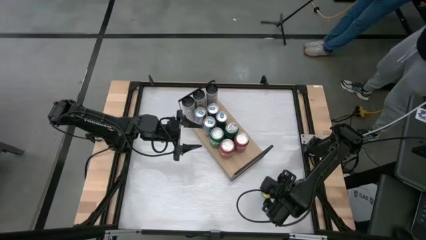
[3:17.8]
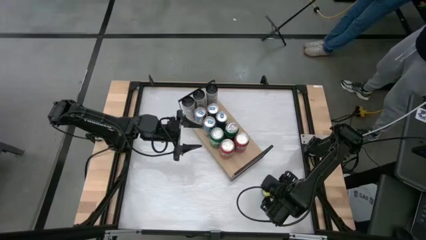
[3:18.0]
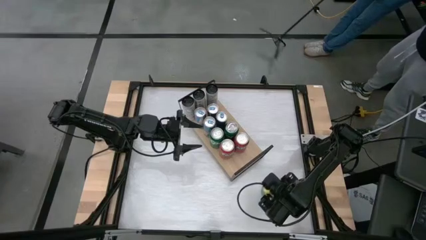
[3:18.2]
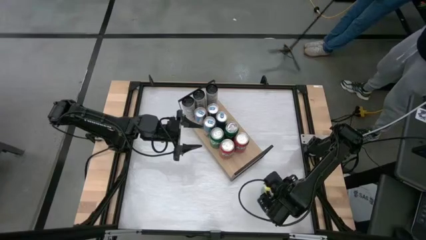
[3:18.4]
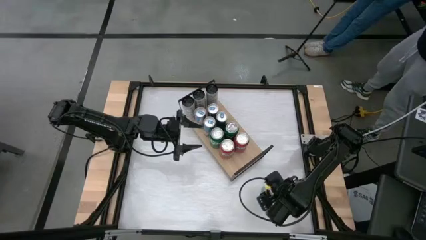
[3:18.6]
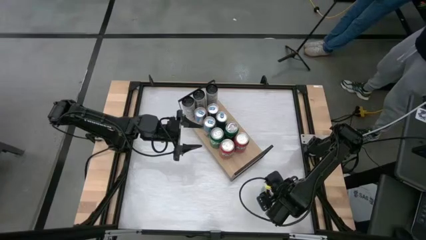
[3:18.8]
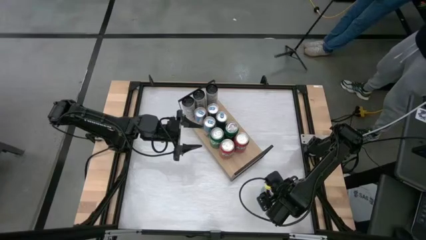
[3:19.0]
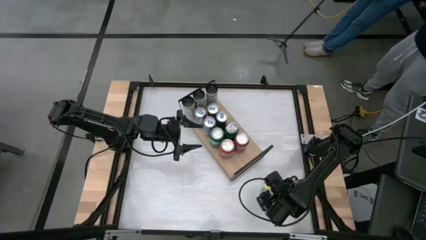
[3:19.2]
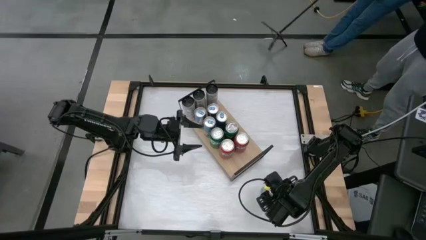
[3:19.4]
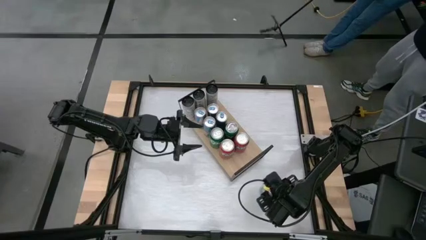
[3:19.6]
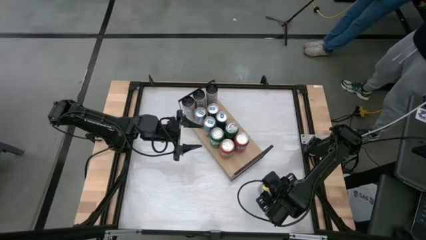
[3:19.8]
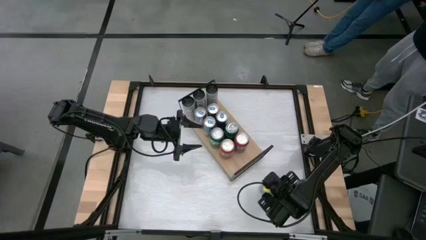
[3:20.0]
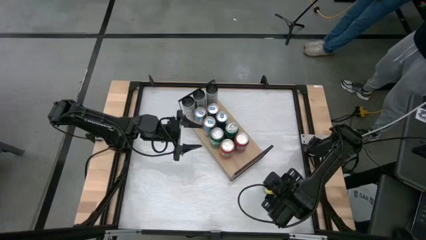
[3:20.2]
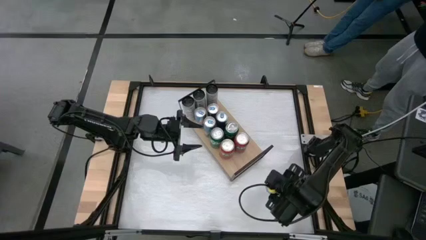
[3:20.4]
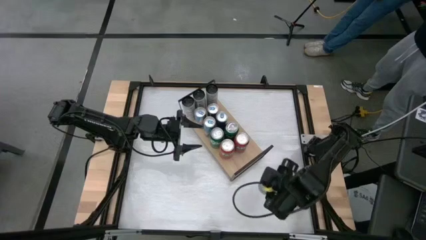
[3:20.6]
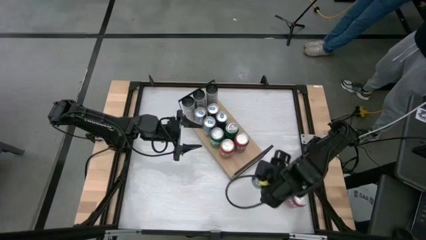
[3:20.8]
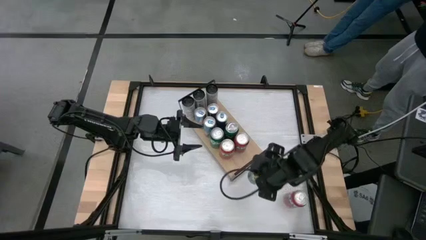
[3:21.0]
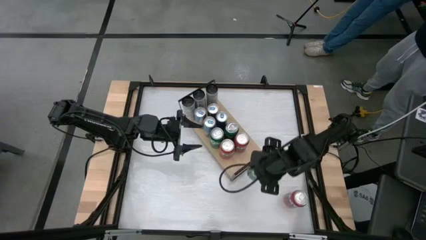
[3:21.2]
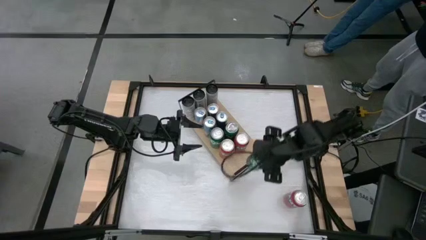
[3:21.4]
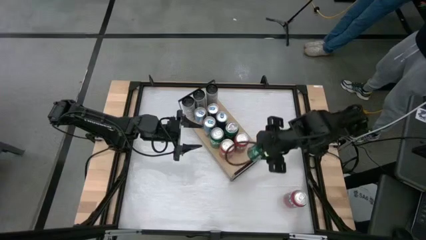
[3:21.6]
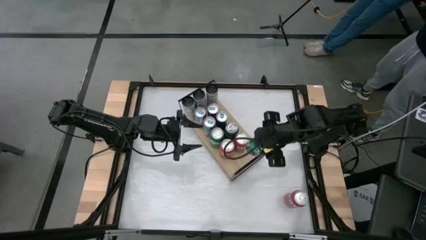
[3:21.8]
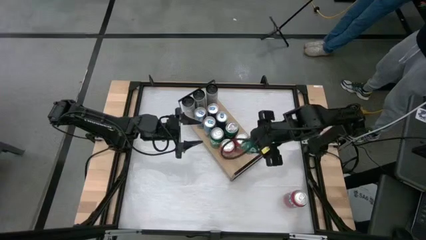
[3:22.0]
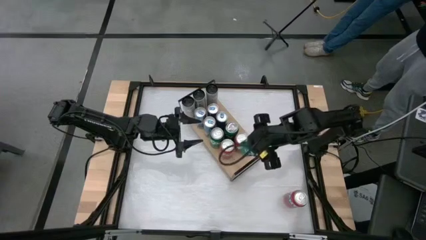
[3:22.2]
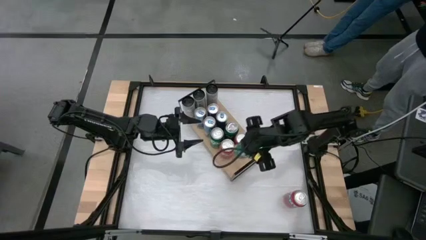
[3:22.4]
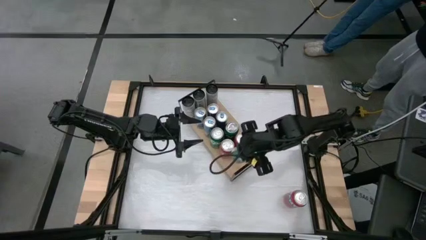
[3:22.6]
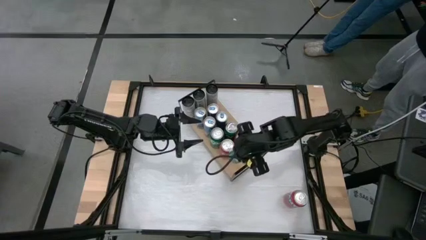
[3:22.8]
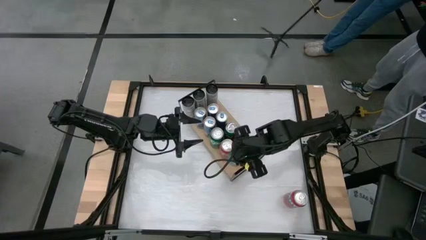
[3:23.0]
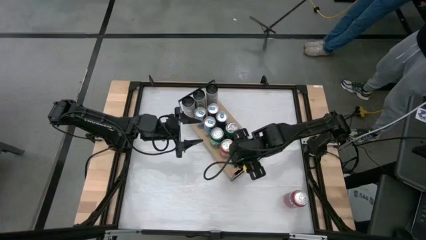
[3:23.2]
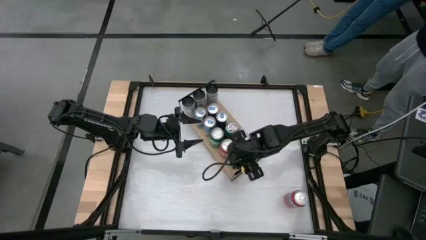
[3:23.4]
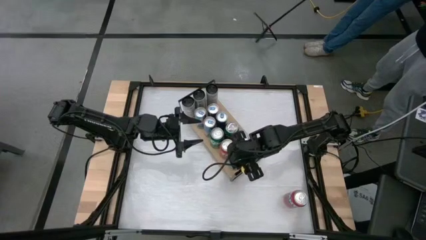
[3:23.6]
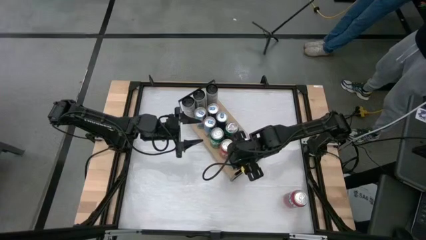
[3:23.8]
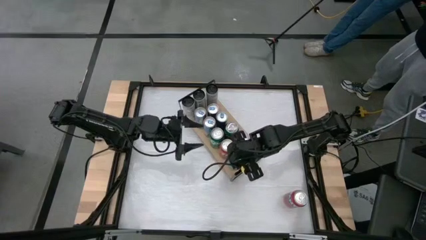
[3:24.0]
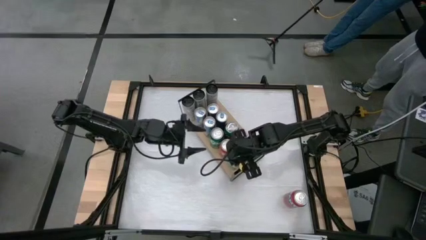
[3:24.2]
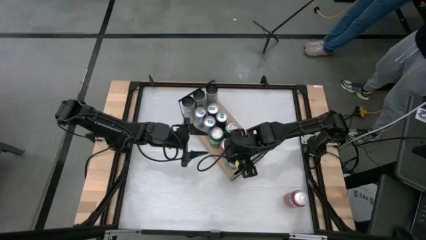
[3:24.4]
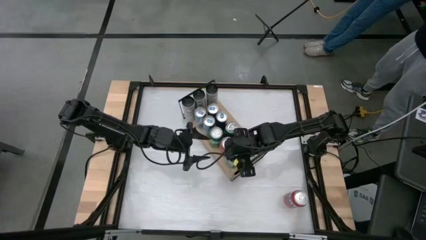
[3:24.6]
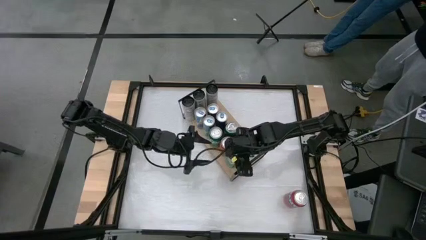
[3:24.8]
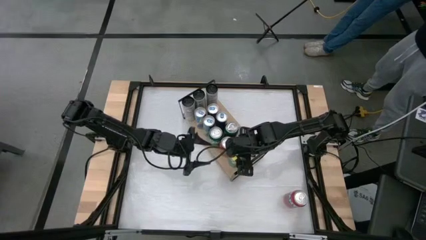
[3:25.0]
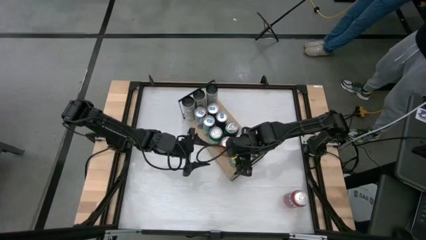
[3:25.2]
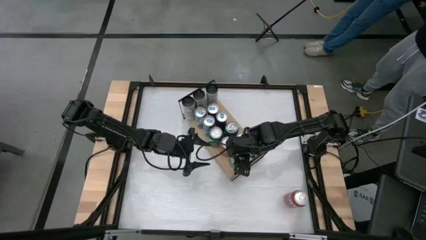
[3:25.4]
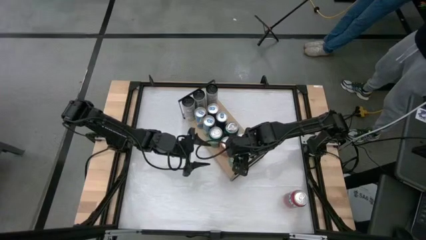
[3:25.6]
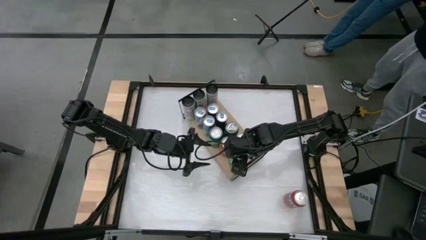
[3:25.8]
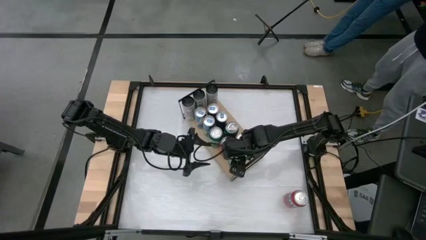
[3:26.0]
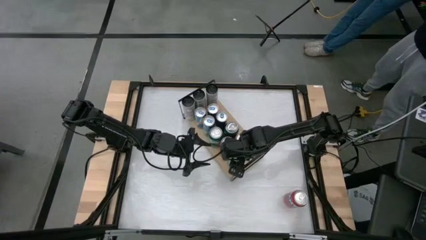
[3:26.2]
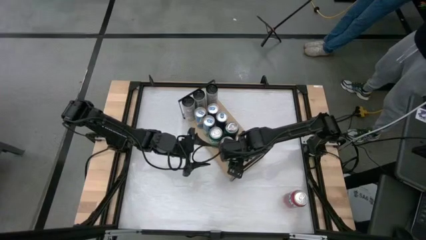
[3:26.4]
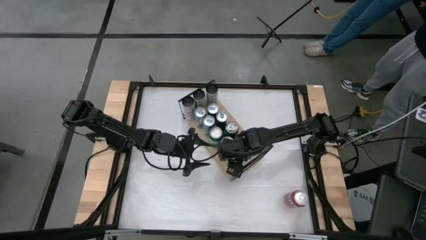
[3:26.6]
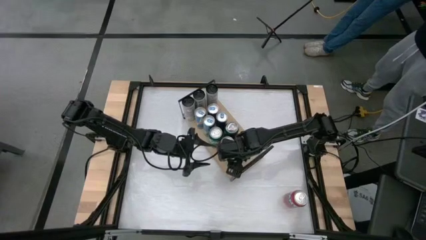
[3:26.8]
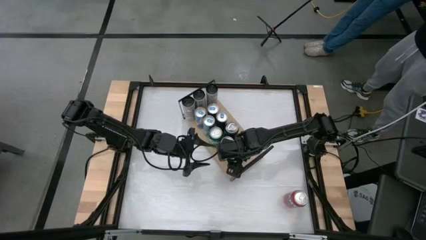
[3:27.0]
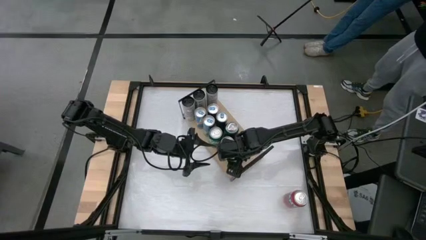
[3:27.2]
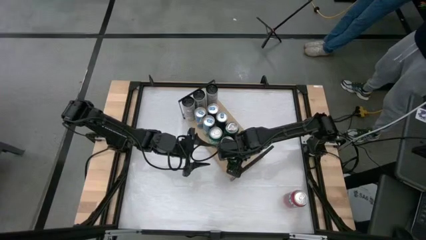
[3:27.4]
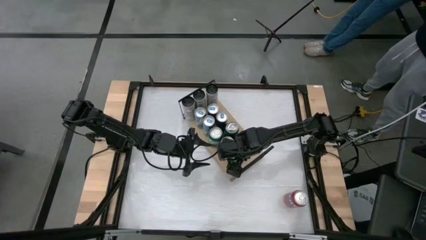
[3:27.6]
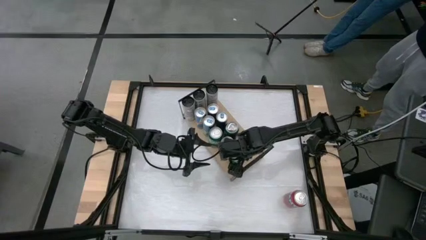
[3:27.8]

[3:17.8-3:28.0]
Task: Place canned beverage on shelf
Put the green soda can on the shelf

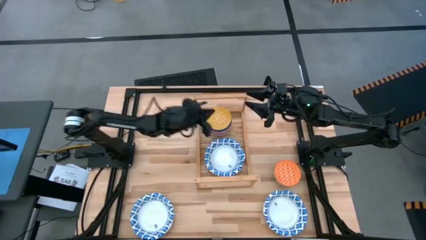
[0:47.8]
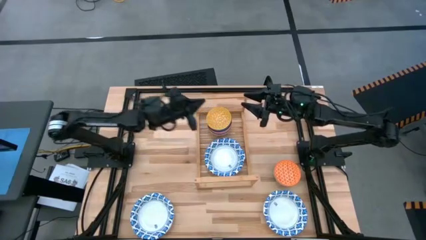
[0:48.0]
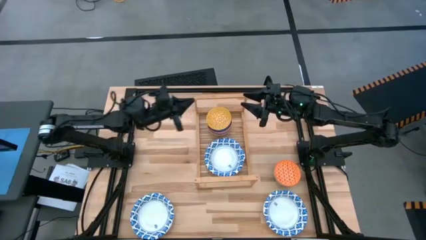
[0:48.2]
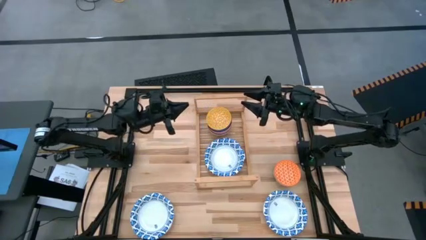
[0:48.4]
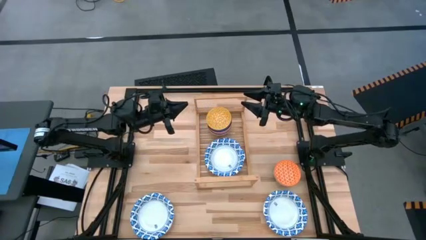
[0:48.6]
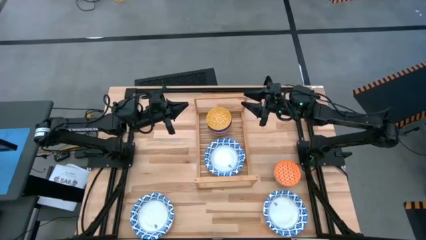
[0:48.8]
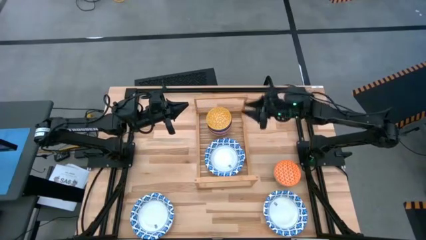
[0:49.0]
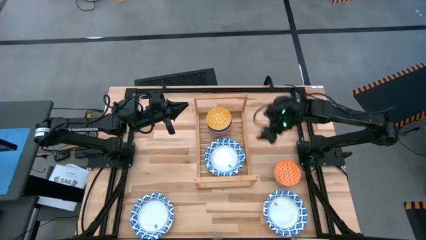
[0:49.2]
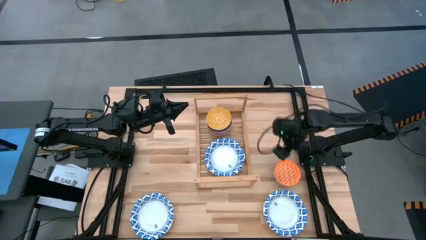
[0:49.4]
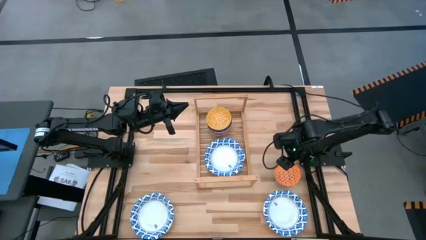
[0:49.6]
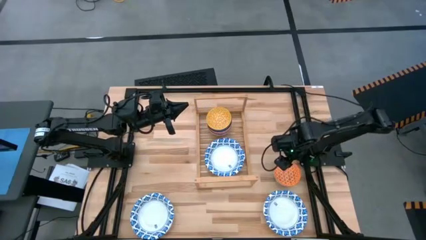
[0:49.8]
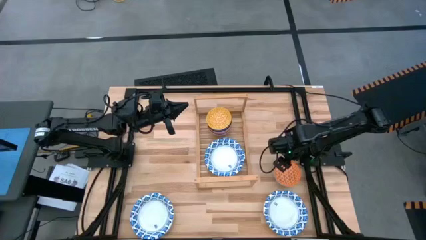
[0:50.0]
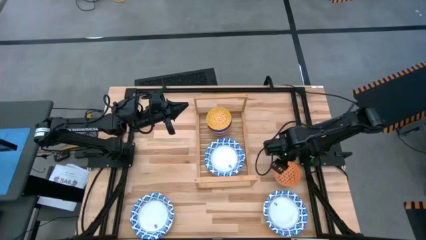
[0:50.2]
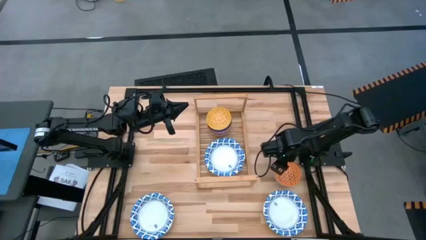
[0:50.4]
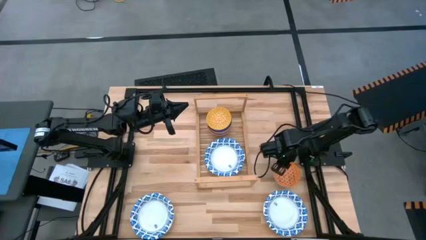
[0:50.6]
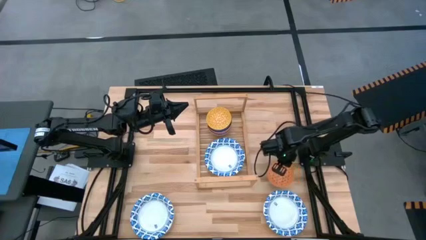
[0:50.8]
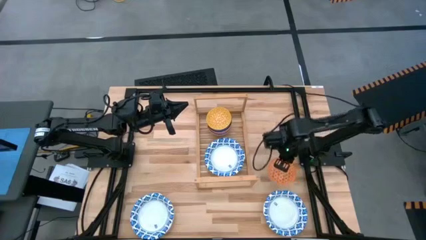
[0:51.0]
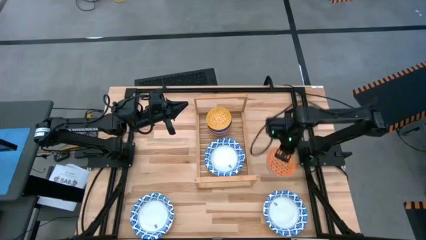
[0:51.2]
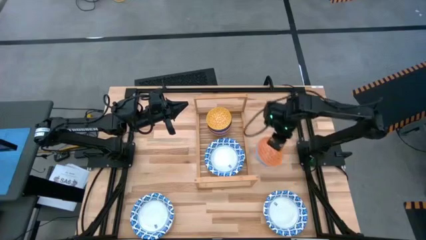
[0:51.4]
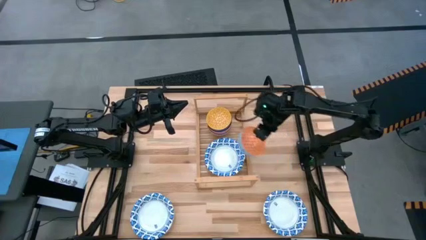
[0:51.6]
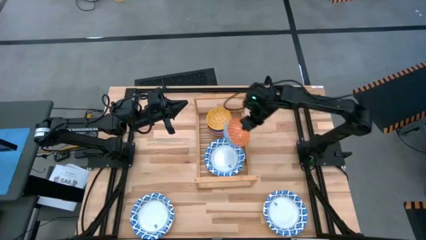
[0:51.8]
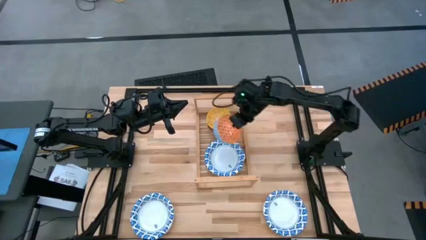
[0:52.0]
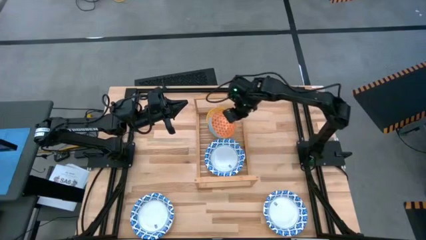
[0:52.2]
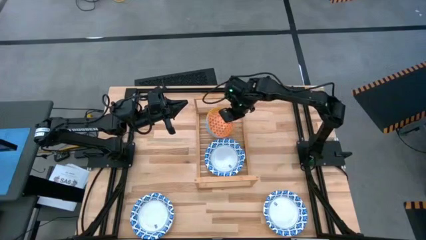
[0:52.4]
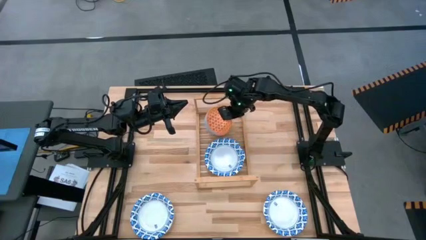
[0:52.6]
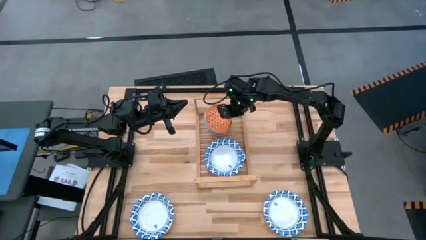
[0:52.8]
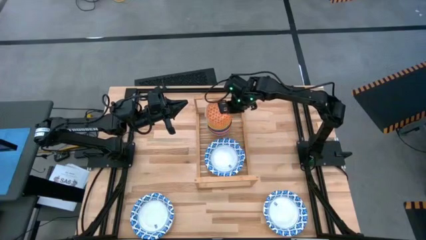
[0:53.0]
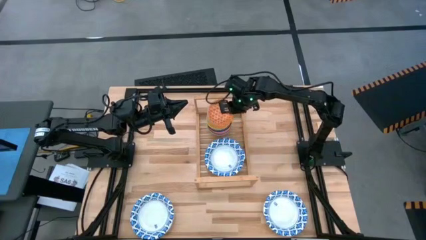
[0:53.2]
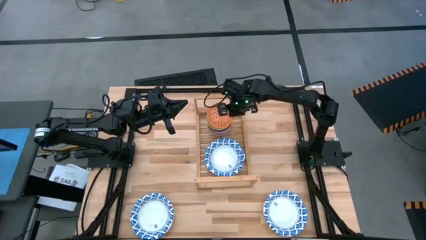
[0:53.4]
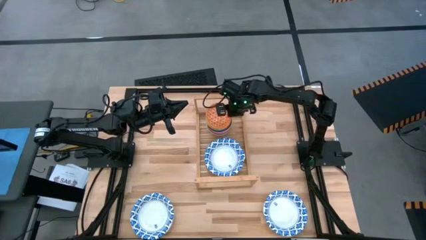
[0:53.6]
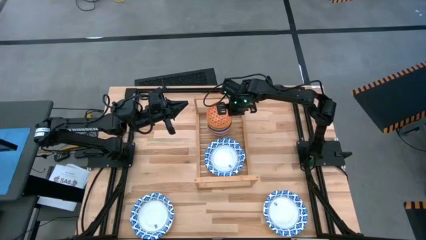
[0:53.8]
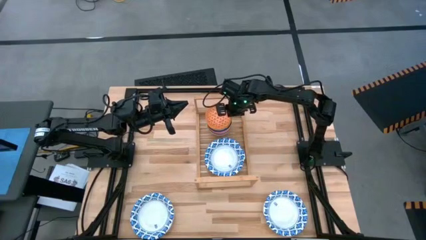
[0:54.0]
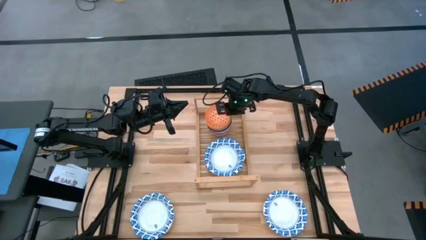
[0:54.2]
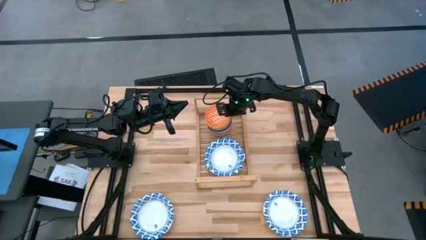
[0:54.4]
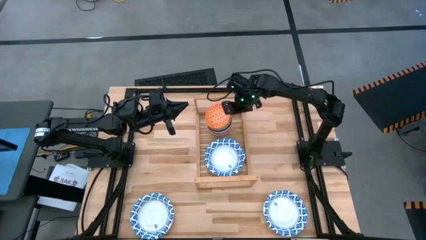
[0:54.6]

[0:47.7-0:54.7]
Task: Place and stack bowls onto a shelf
Stack the orange bowl on top of the yellow bowl on the shelf
